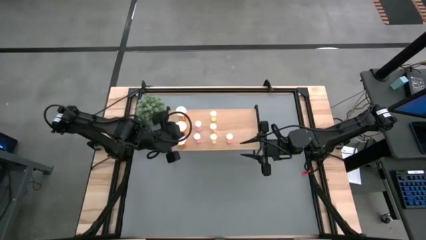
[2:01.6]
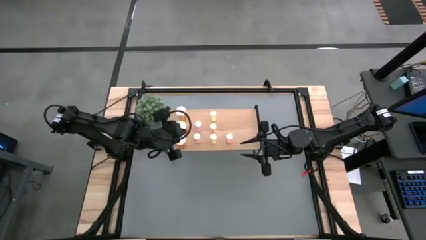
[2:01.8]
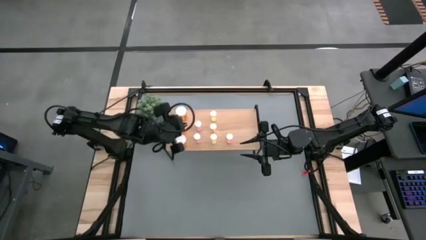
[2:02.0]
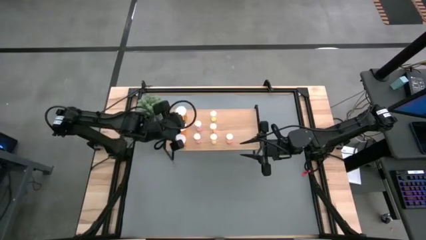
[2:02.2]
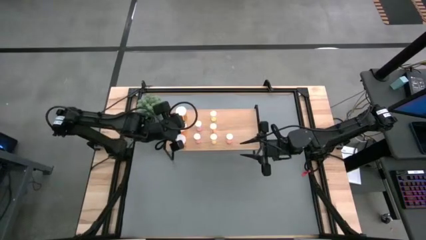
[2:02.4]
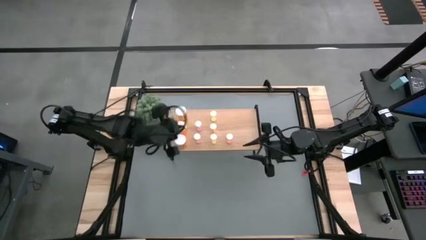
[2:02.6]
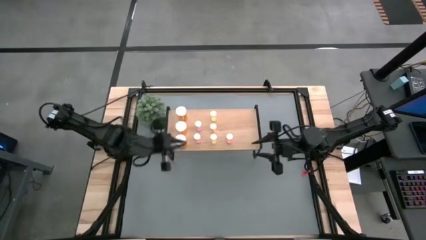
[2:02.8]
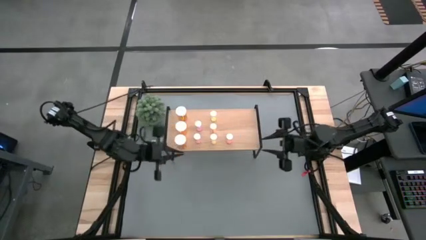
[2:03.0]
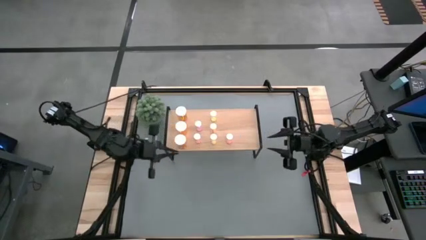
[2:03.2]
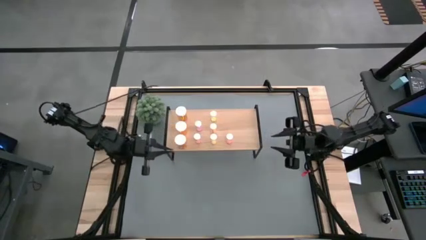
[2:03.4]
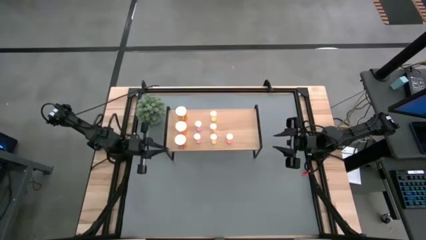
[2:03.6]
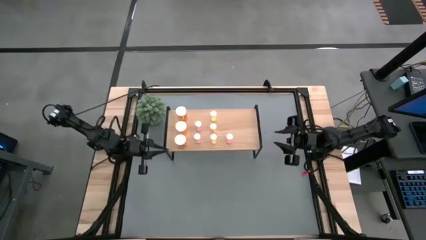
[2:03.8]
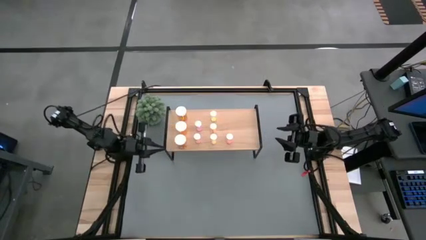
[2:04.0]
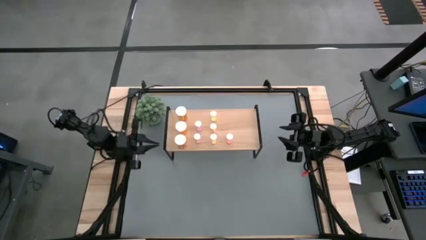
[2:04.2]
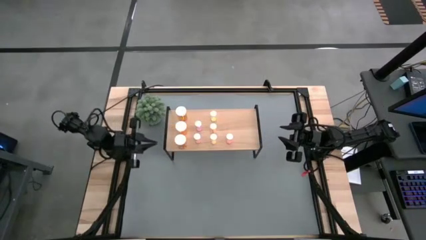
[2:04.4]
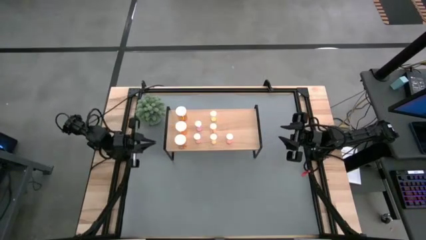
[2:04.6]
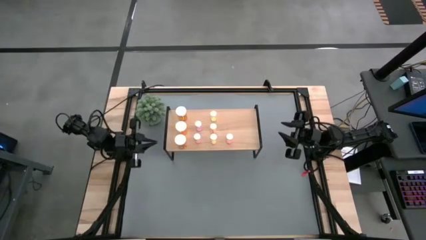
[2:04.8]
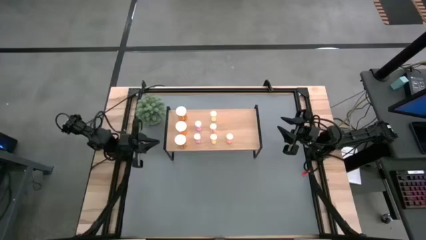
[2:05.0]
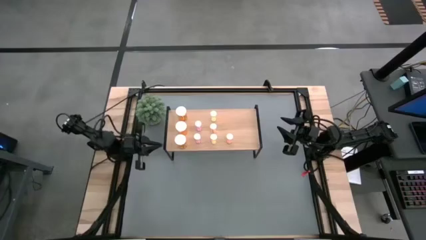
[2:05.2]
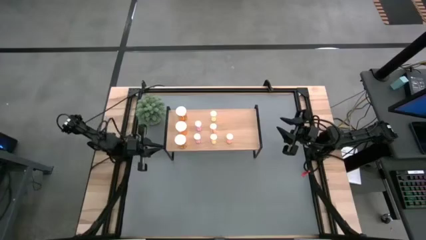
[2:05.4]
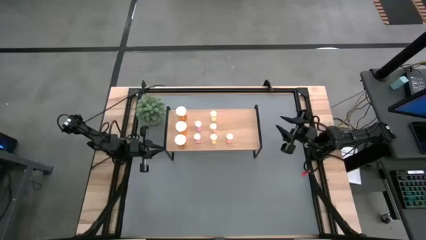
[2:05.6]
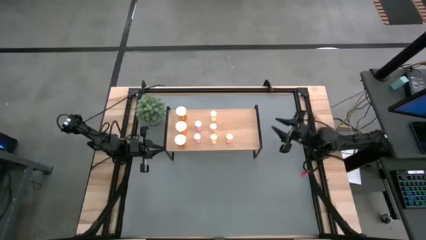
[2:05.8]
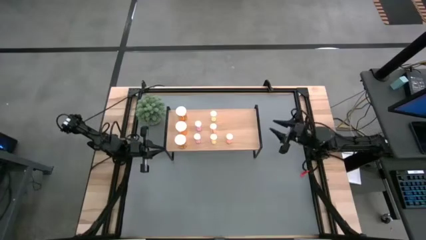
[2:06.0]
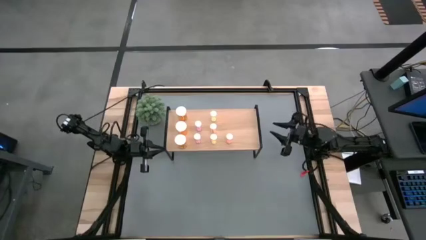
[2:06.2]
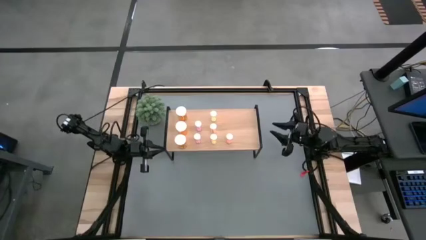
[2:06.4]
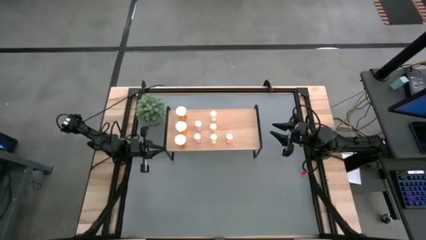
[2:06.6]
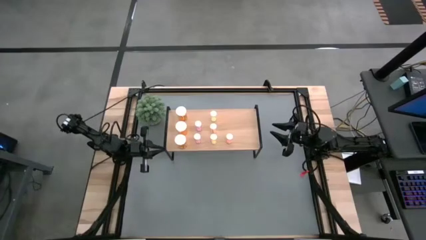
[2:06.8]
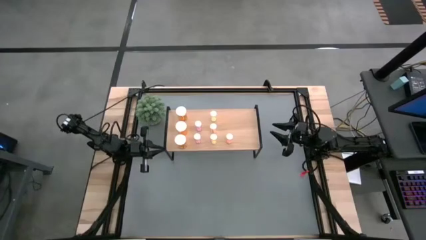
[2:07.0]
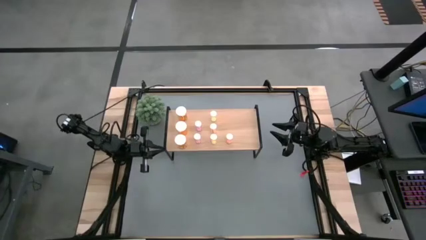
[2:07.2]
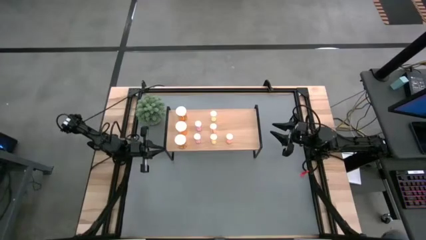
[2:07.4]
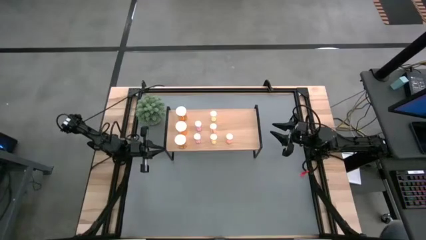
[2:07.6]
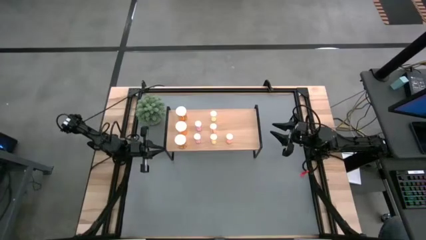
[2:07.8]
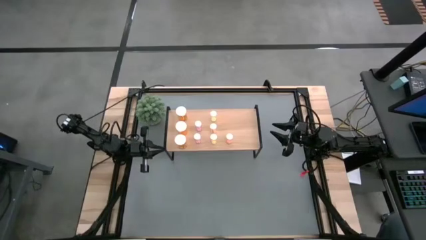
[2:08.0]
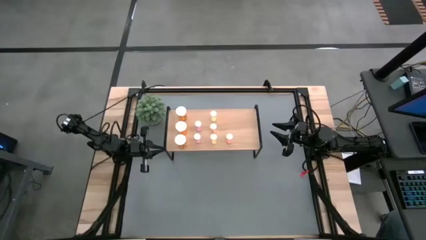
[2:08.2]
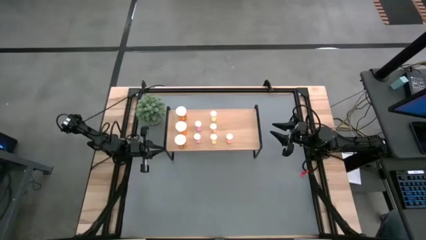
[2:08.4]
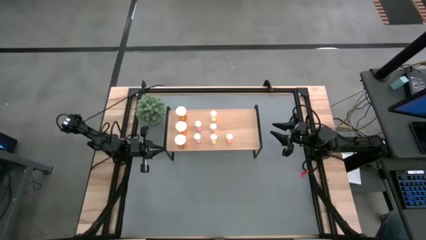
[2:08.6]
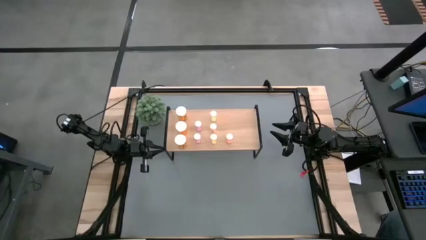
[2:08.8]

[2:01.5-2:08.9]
Task: Pick and place medicine bottles onto shelf by color
Return to Home Position

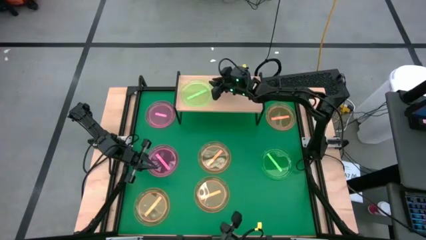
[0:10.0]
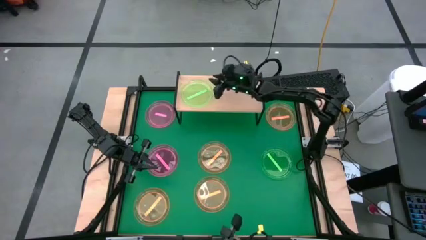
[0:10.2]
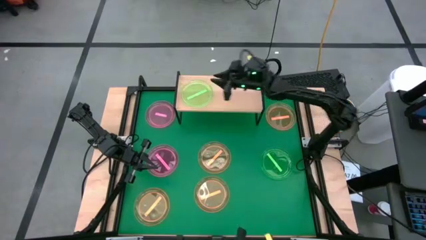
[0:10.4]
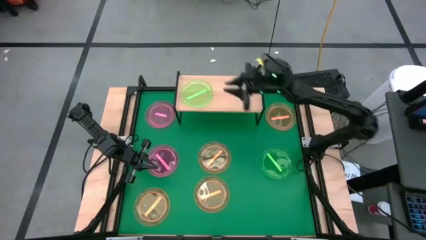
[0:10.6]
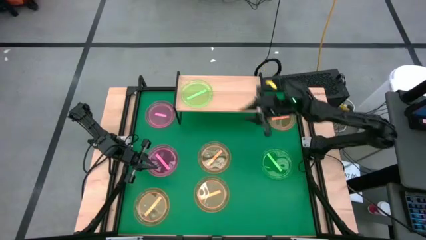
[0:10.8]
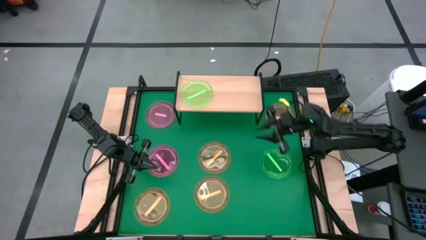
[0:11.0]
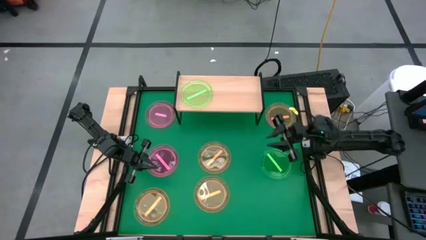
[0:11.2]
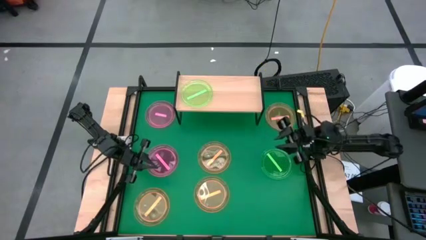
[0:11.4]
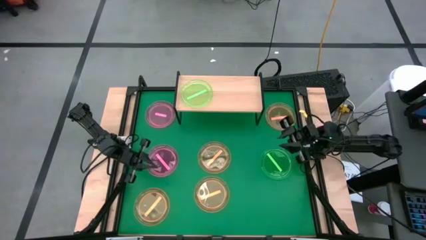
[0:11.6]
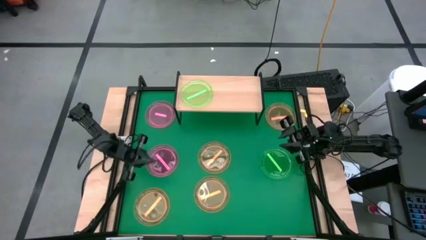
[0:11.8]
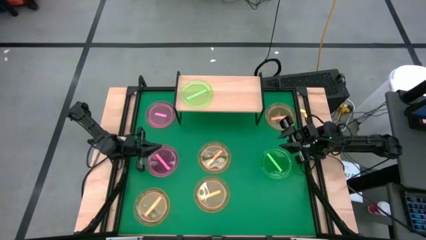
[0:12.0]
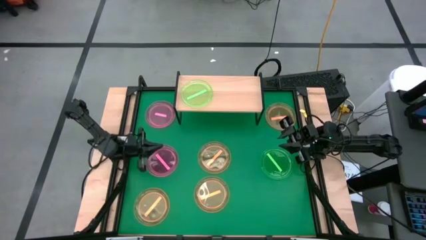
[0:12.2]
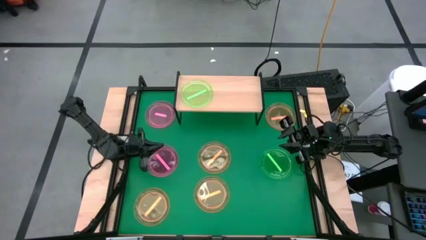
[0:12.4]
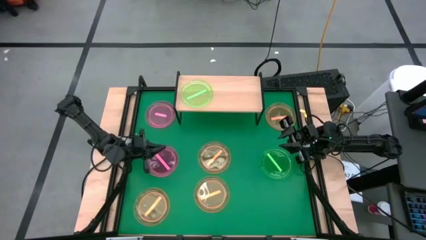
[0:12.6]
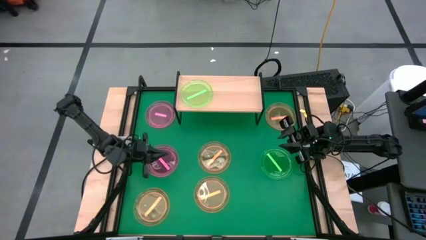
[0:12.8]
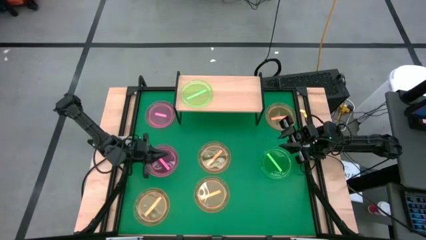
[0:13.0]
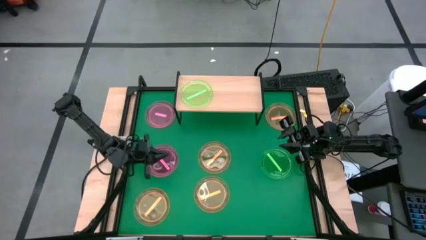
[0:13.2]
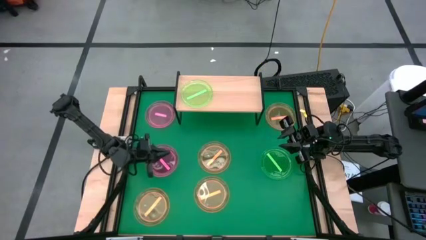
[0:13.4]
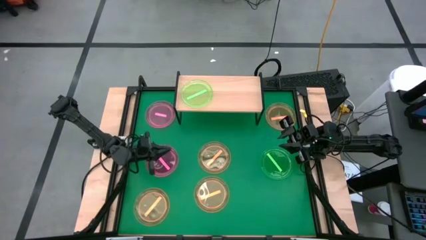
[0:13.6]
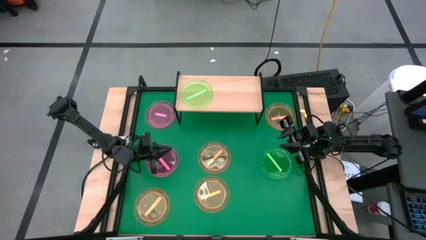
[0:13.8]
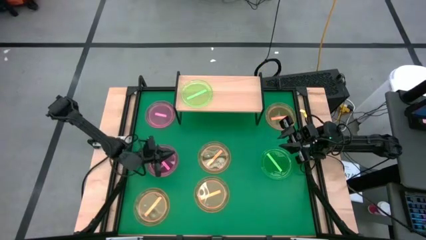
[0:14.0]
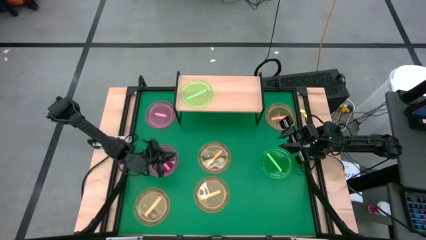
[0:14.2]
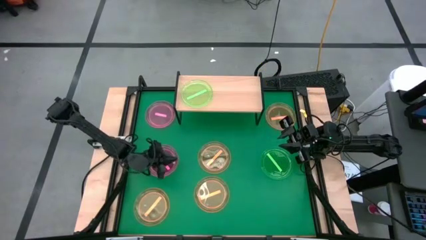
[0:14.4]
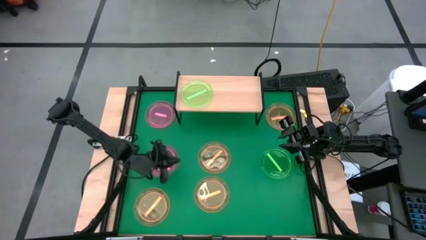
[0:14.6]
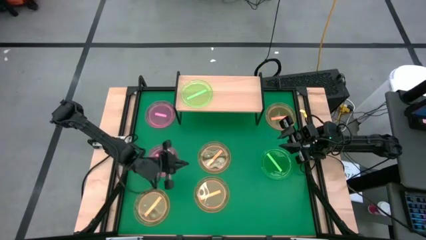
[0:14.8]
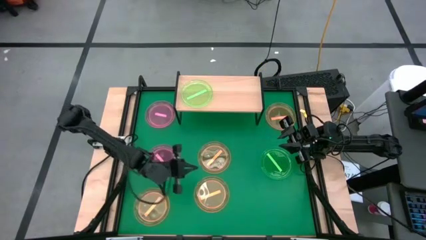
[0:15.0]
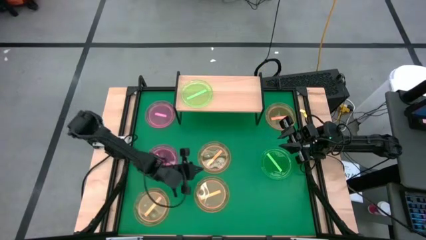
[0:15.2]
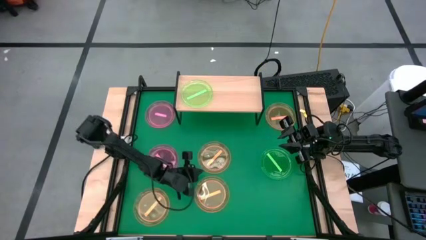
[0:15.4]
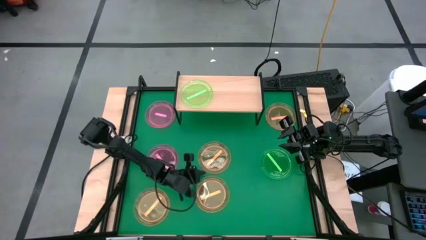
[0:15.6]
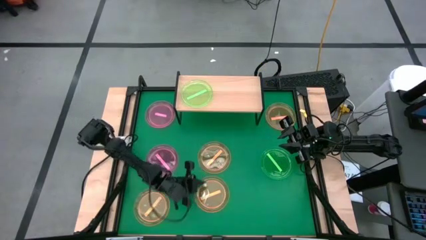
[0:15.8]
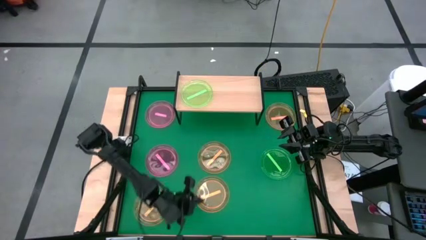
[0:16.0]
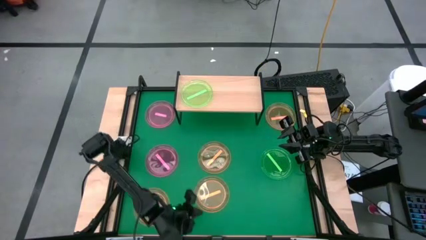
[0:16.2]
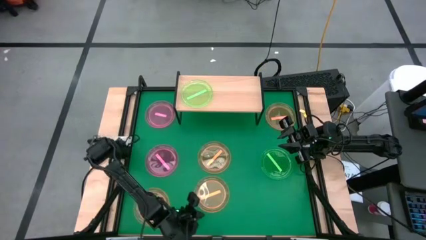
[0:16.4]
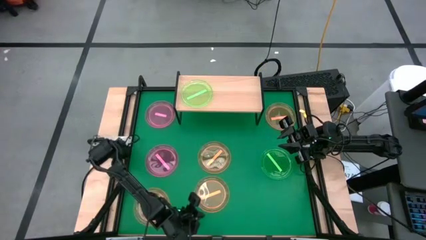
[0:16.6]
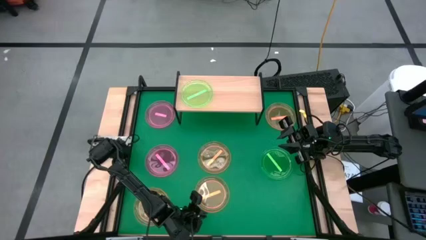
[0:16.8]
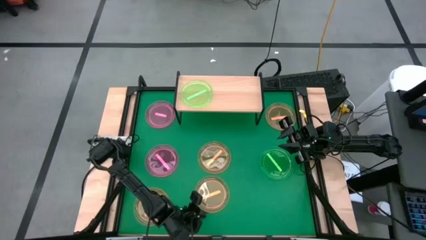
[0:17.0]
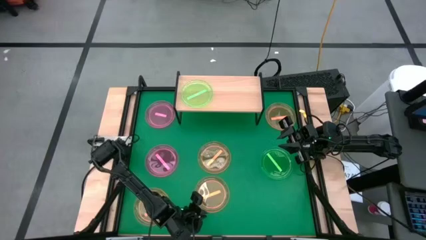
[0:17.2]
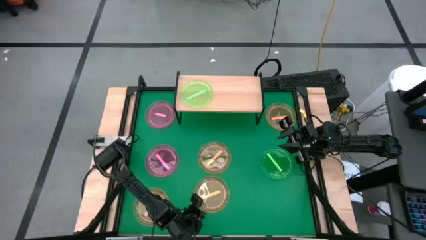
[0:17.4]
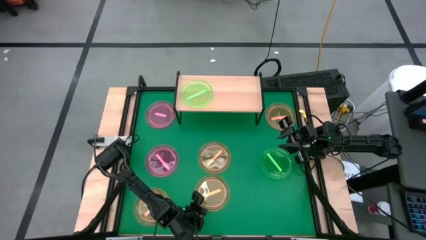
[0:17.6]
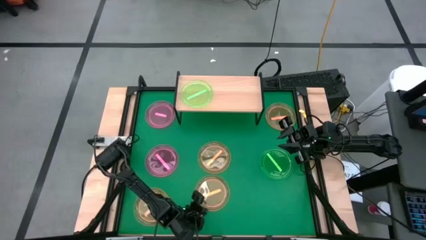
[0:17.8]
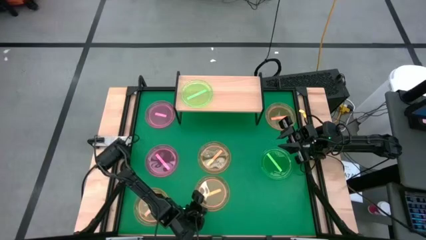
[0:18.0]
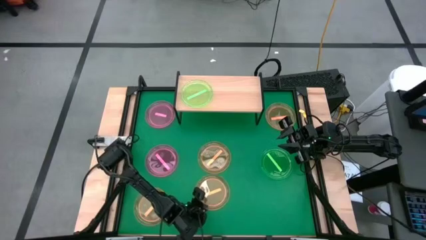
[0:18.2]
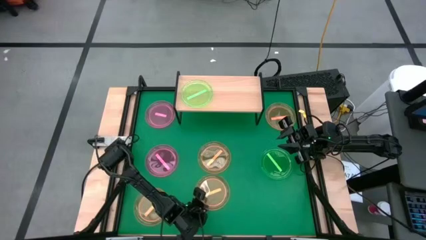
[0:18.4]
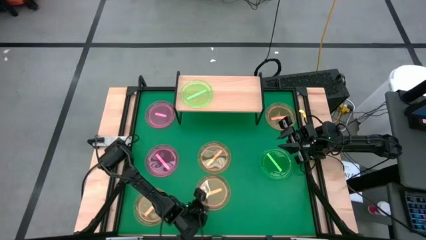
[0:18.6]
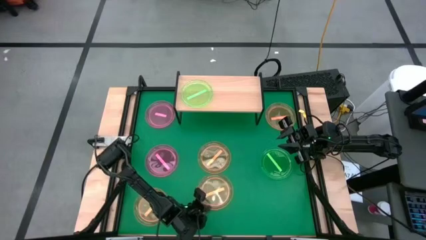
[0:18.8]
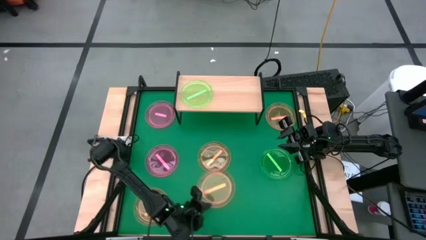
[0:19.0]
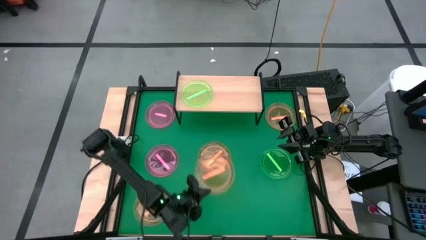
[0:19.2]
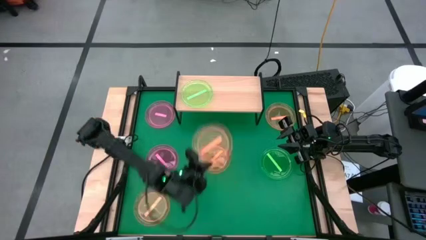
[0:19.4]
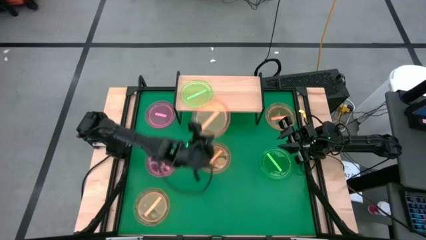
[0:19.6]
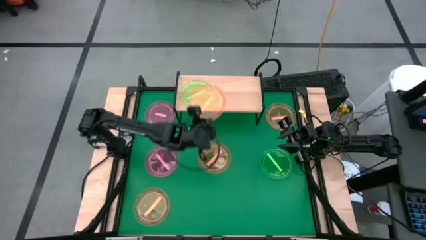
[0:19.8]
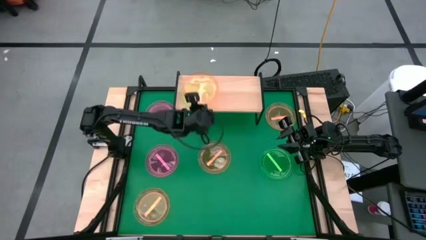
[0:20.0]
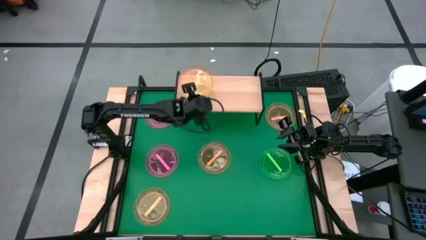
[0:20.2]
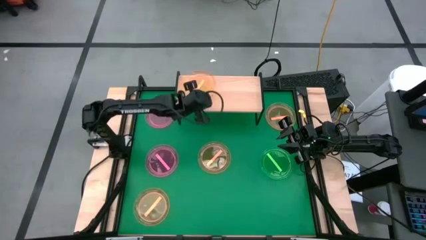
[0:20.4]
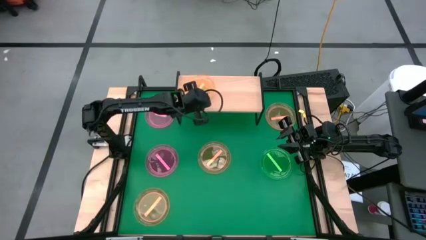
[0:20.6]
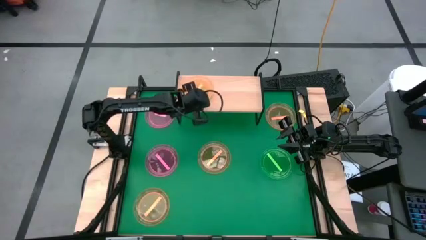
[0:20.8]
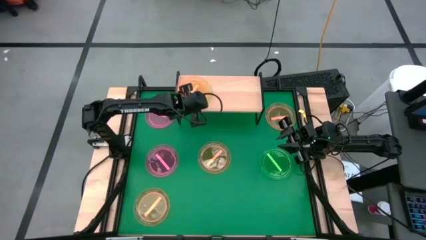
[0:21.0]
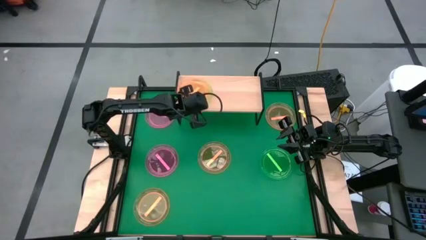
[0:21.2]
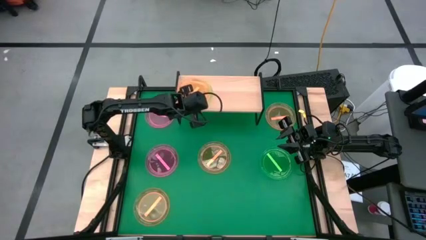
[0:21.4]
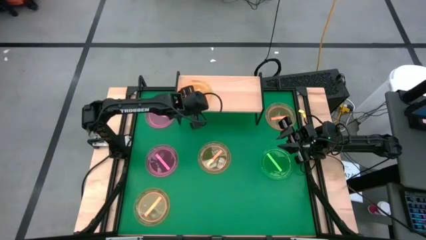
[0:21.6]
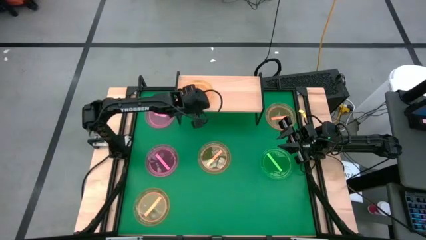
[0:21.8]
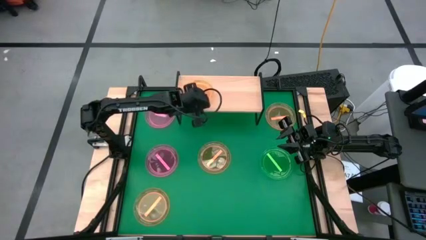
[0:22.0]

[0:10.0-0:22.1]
Task: Place and stack plates onto a shelf
Stack the bottom middle orange plate on the green plate on the shelf
